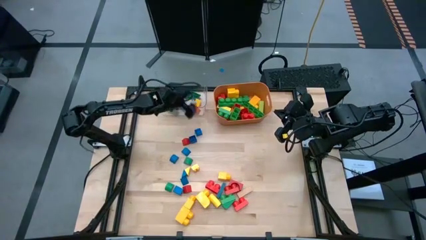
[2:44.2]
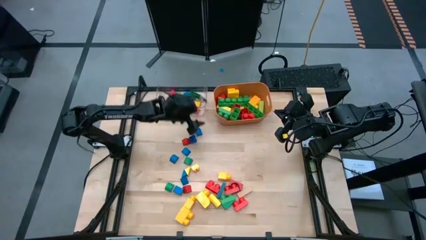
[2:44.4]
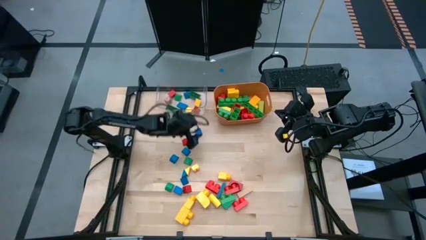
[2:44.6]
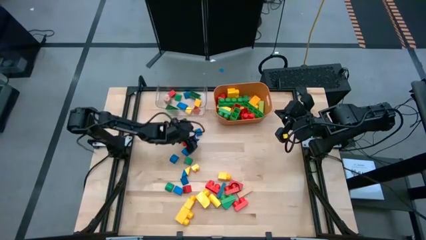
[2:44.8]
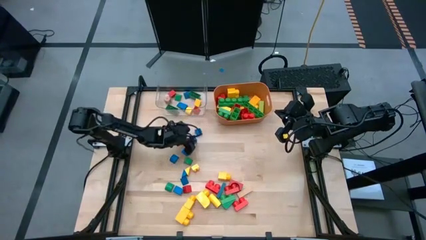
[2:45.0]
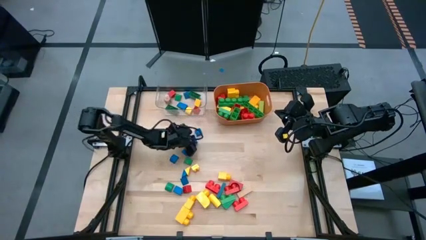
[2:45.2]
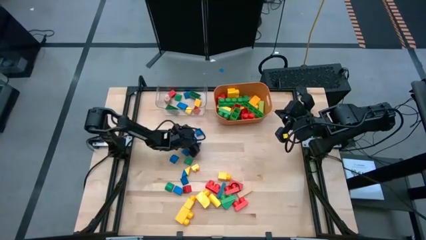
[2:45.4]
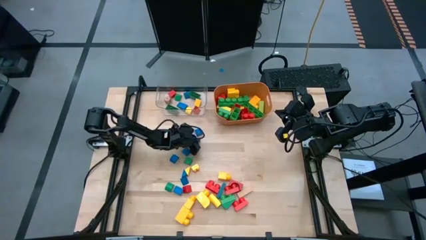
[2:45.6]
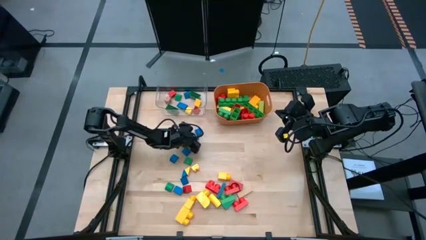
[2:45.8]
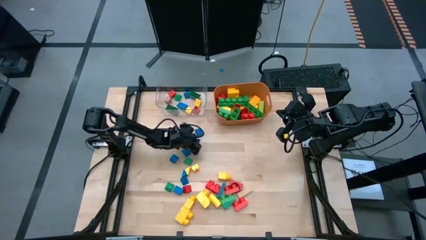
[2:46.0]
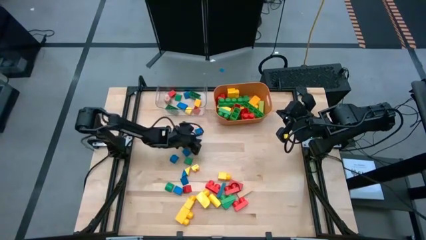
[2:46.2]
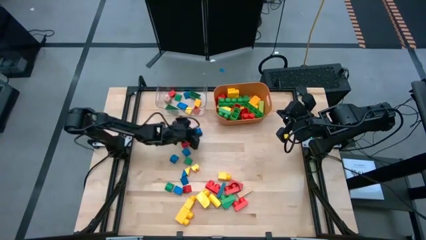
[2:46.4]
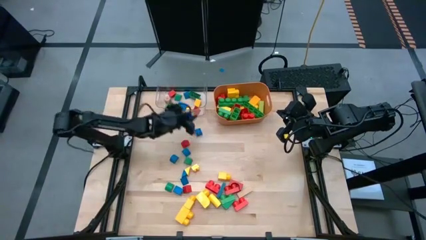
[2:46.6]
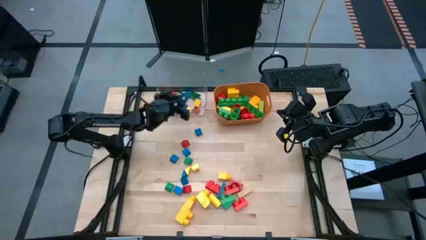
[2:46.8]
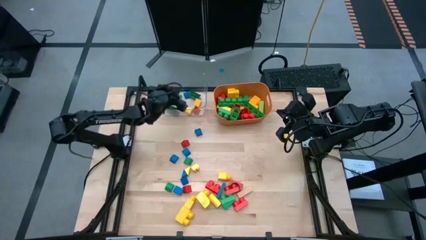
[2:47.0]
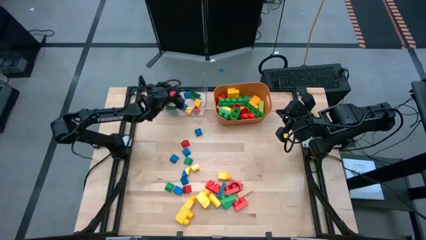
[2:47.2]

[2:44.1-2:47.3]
Task: Sort blocks by size
Put the small blue game piece into the transparent bin

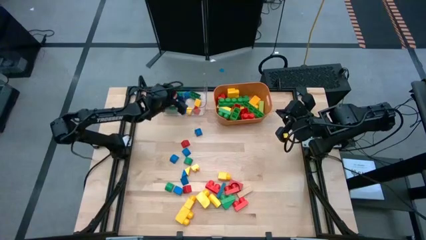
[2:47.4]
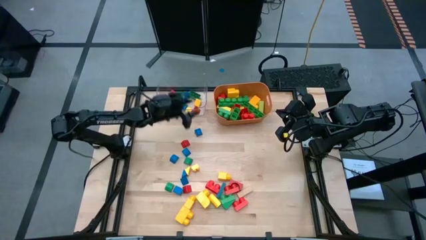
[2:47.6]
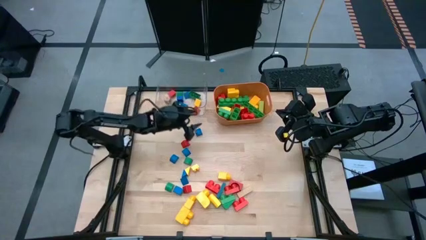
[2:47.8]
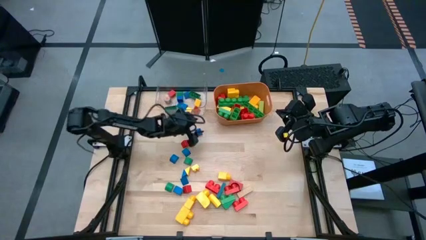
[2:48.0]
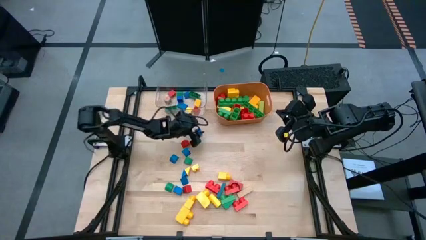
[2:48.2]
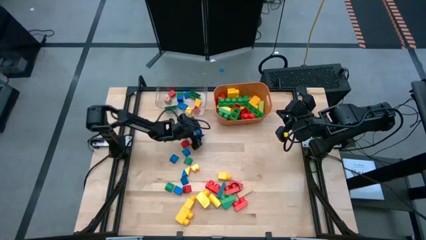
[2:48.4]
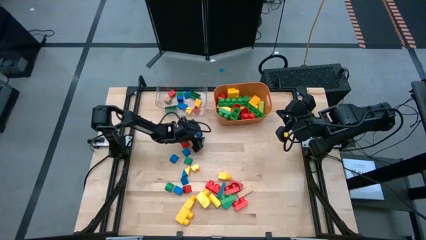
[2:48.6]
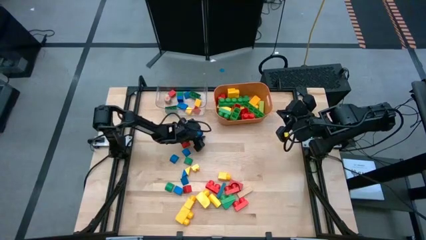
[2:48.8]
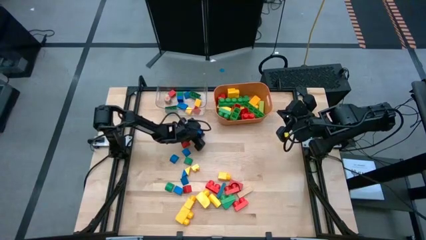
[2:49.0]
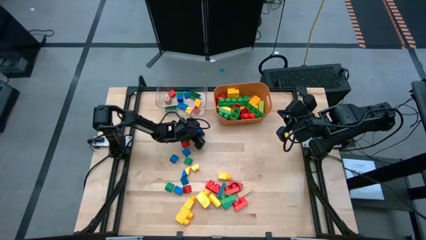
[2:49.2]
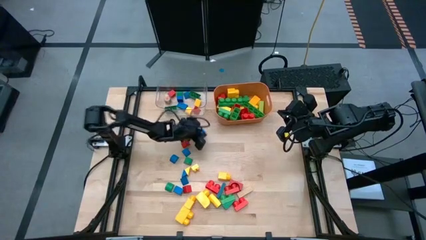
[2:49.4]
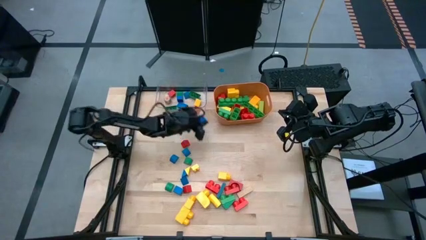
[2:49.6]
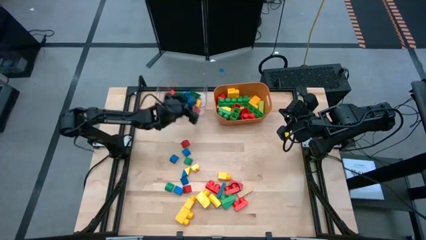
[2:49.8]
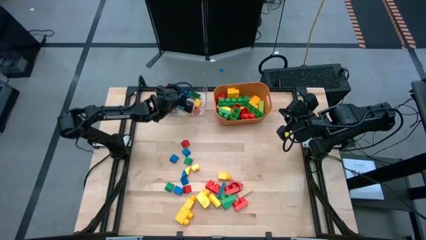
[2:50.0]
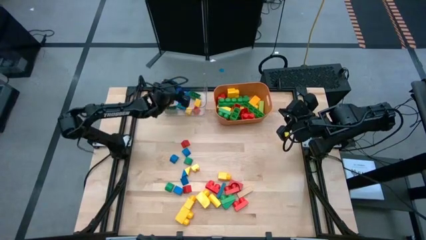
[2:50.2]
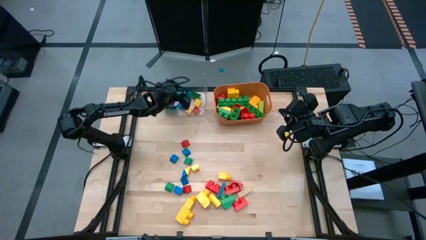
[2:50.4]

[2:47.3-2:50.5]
Put the small blue game piece into the transparent bin

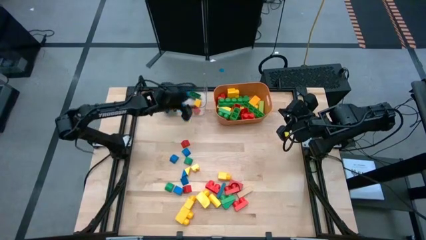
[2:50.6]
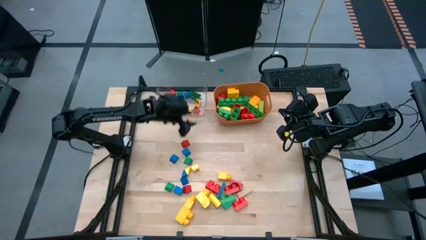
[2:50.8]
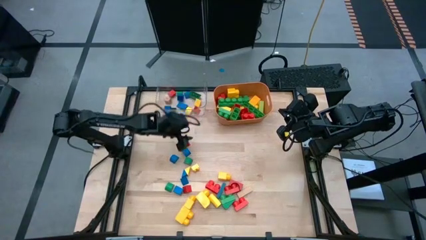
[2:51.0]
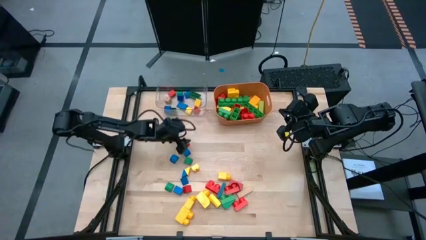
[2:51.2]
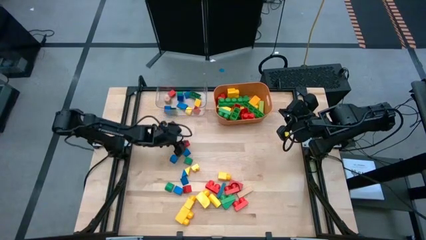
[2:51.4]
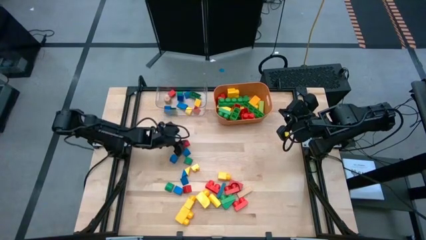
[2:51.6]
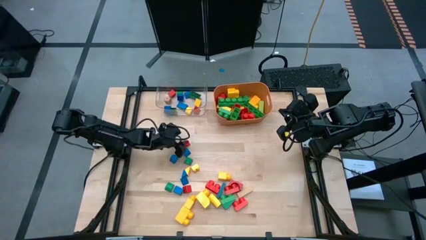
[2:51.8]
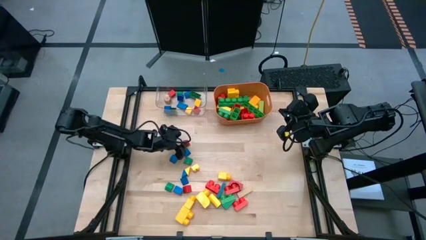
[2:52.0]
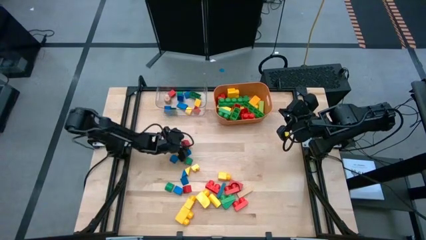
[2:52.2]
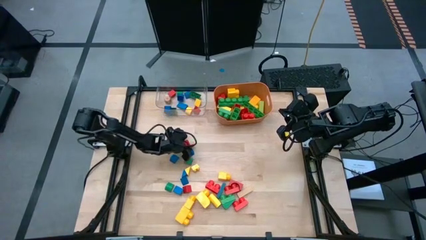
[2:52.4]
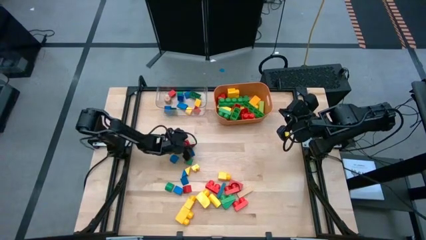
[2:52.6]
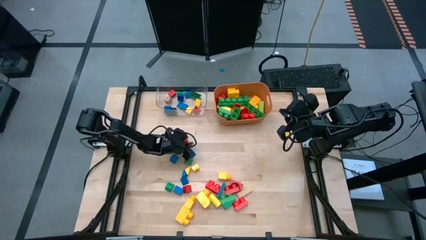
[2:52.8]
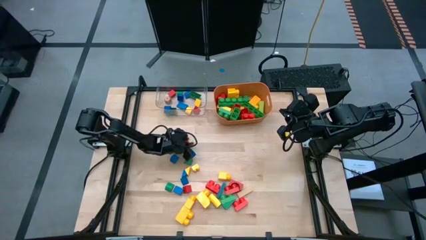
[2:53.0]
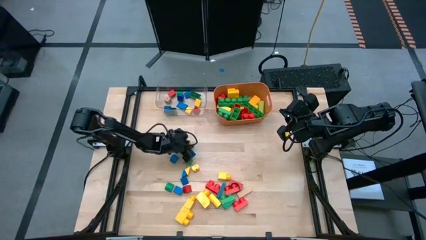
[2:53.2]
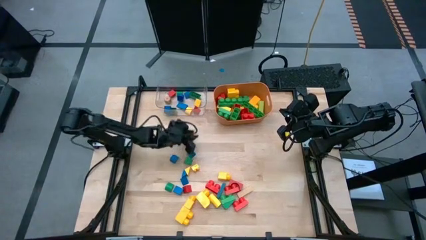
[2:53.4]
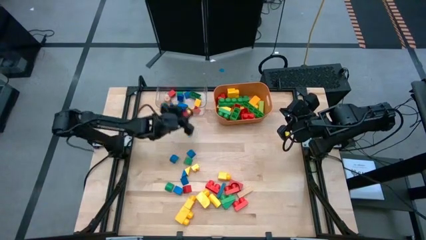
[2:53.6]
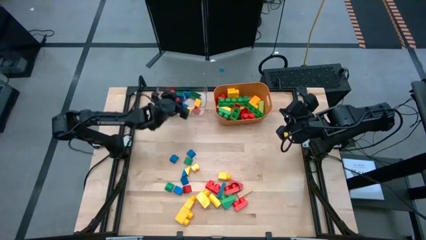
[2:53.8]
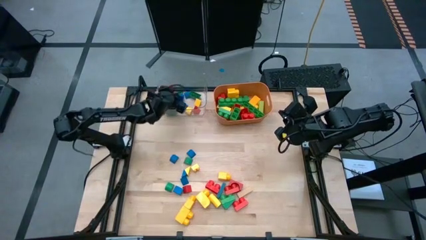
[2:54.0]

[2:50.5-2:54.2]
Put the small red block into the transparent bin

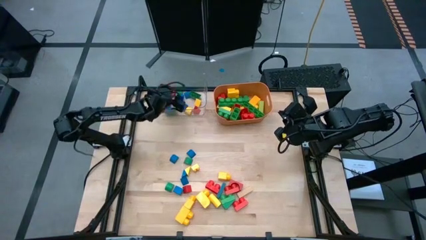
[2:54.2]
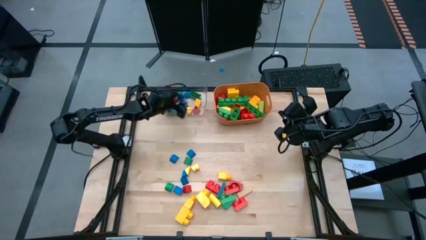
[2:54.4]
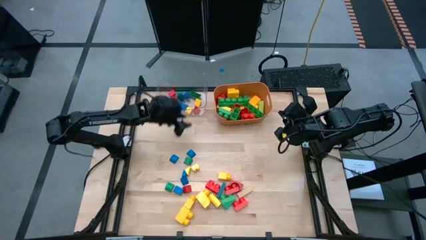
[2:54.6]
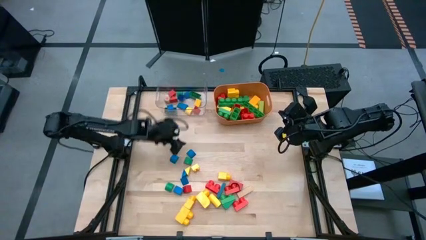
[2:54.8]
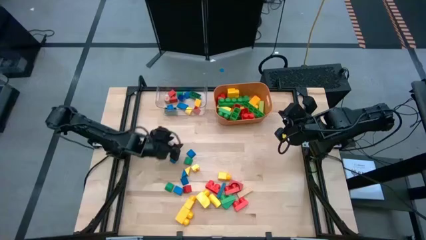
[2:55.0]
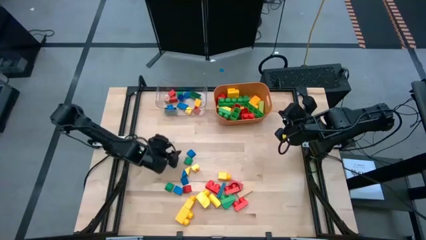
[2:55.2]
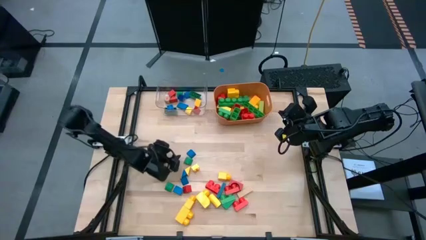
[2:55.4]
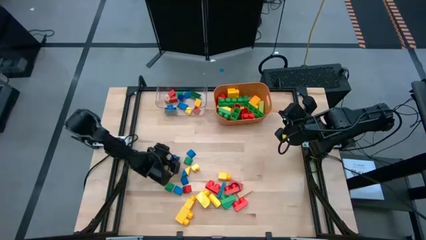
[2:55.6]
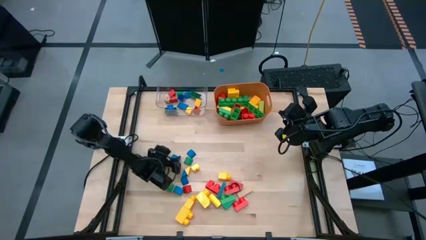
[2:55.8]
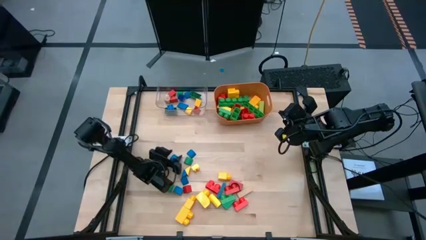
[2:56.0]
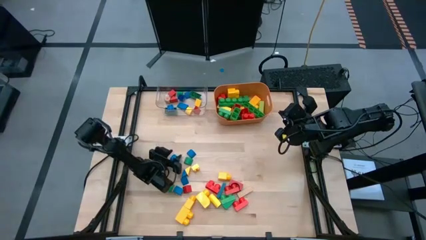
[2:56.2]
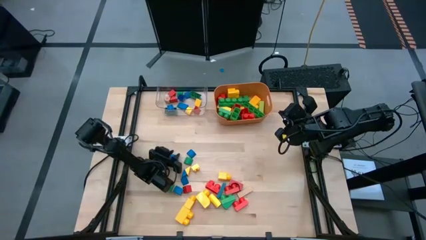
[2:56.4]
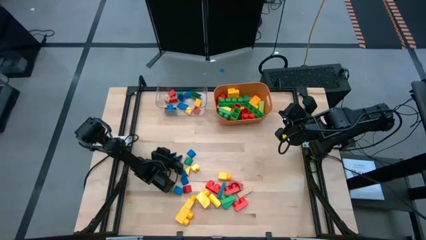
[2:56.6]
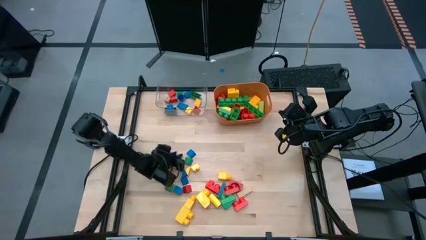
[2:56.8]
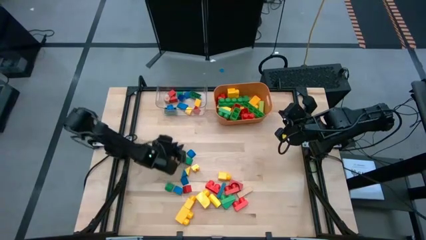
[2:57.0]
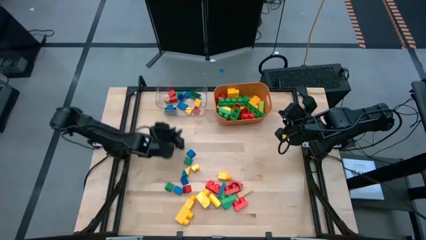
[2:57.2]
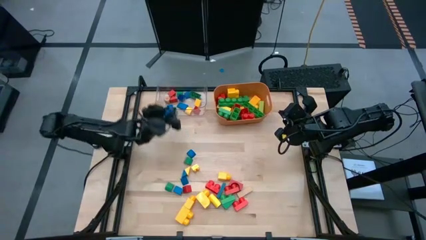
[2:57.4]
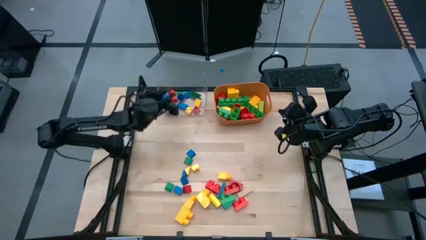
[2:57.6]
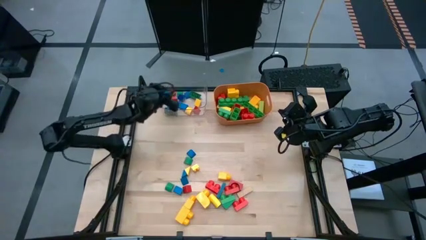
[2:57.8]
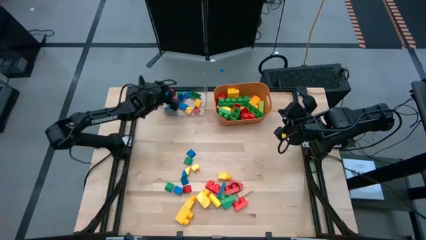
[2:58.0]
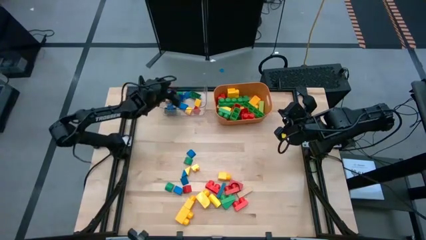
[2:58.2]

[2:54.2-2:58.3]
Put the small blue block into the transparent bin

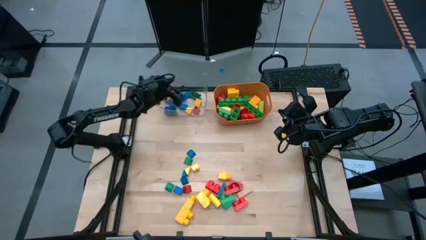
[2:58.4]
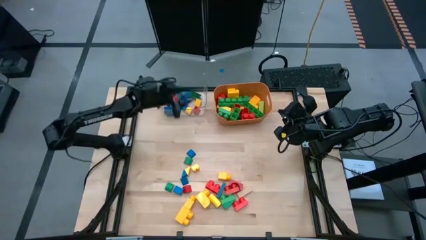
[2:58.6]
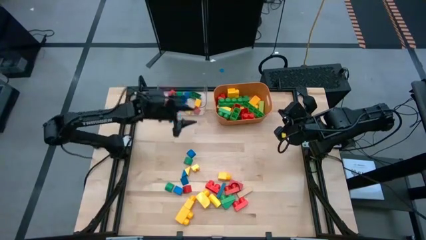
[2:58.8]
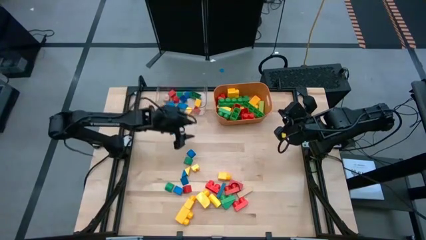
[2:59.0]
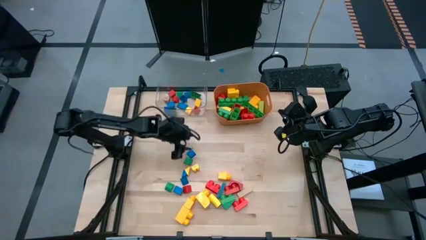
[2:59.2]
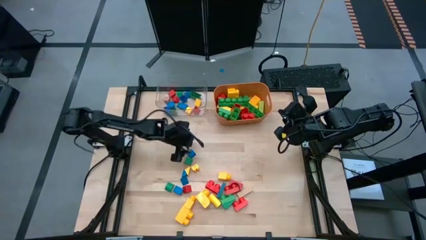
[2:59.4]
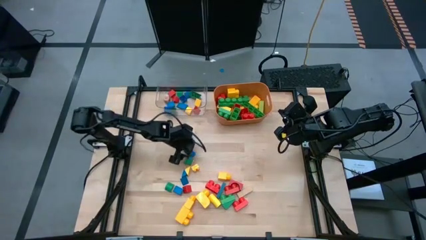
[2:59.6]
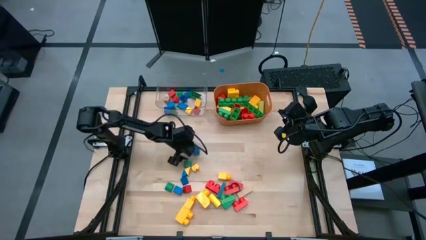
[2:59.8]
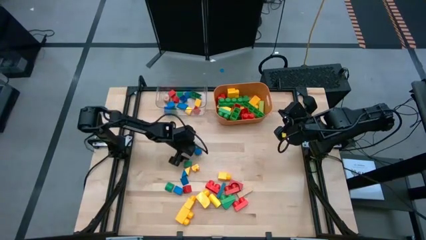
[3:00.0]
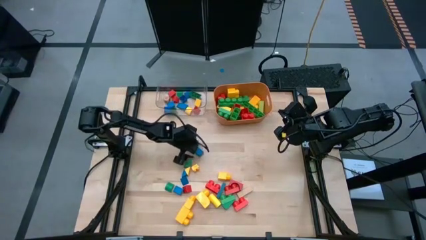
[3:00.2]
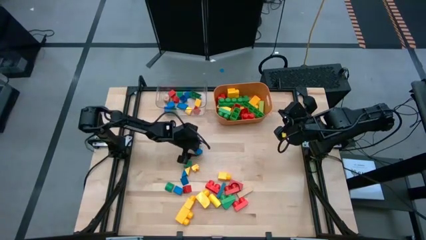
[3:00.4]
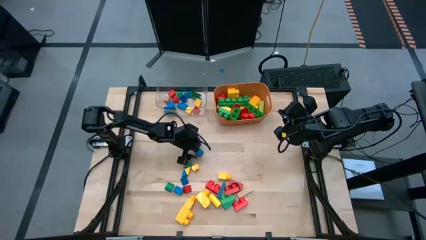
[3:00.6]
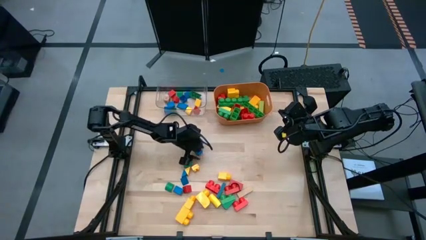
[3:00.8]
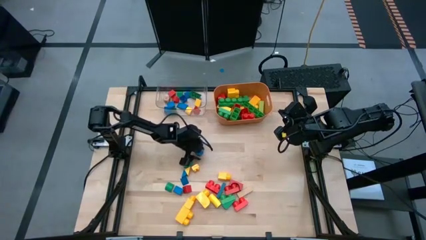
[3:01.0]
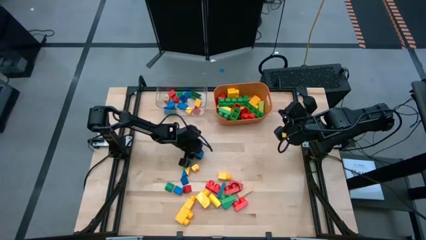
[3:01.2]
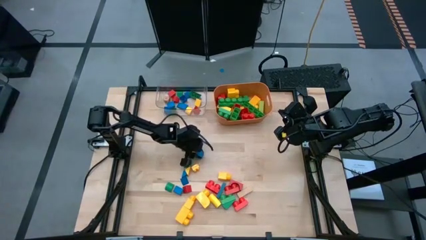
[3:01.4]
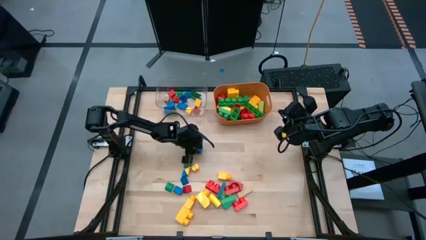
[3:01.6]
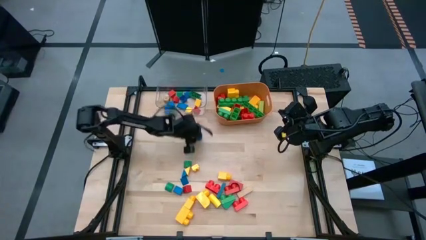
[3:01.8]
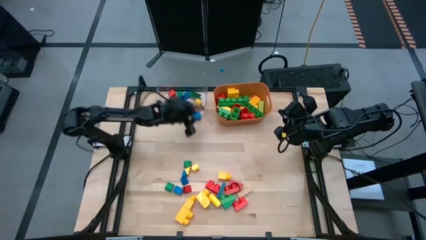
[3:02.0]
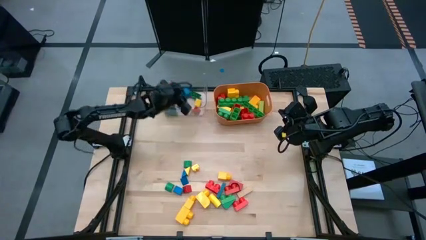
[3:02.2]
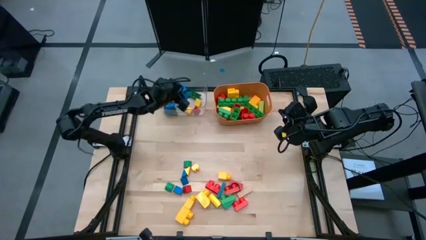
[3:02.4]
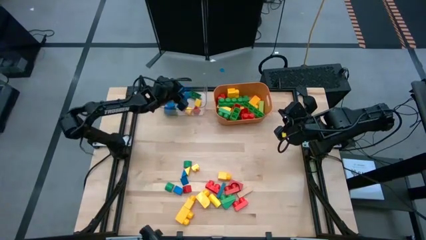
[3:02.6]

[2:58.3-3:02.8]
Put the small blue game piece into the transparent bin
